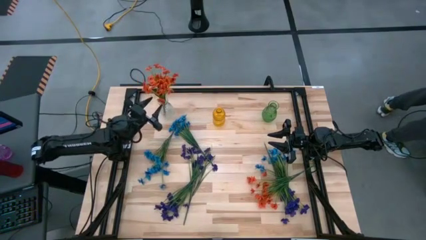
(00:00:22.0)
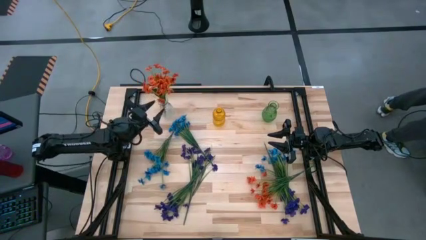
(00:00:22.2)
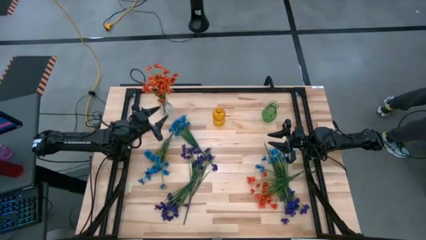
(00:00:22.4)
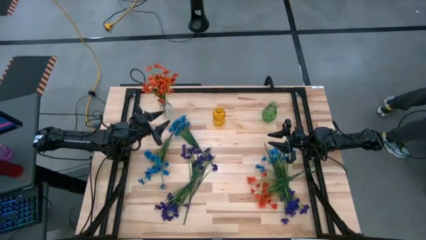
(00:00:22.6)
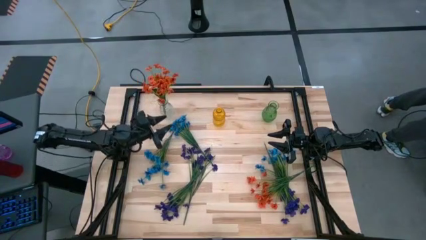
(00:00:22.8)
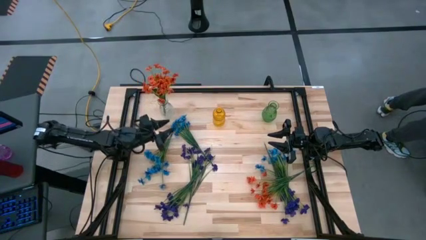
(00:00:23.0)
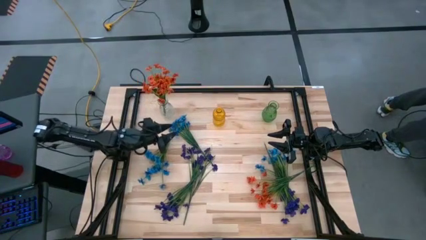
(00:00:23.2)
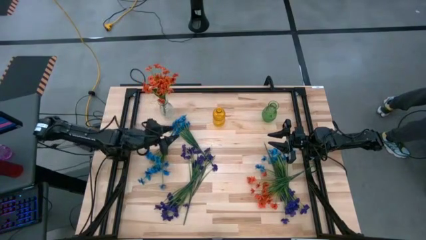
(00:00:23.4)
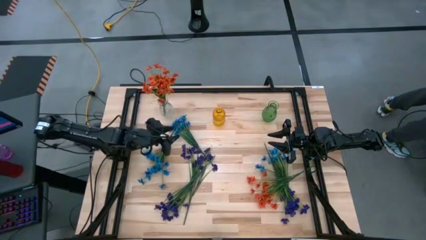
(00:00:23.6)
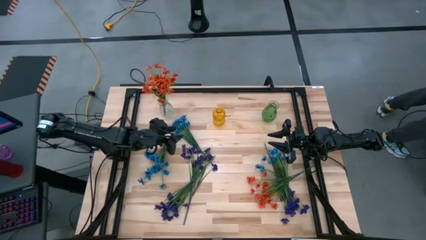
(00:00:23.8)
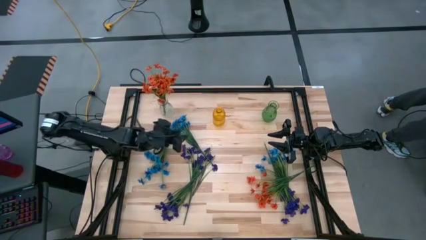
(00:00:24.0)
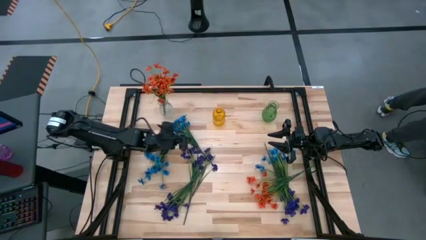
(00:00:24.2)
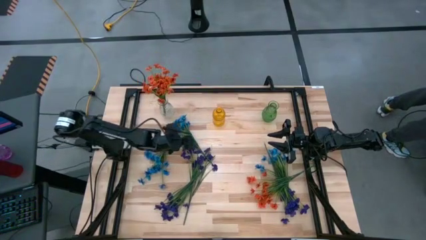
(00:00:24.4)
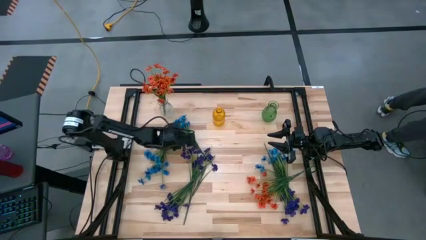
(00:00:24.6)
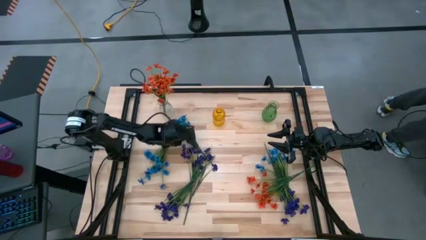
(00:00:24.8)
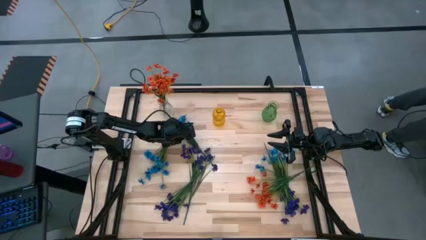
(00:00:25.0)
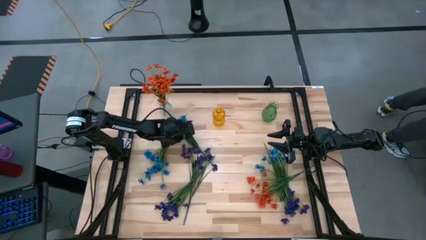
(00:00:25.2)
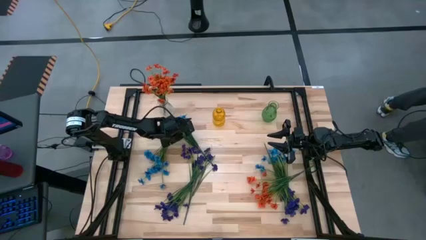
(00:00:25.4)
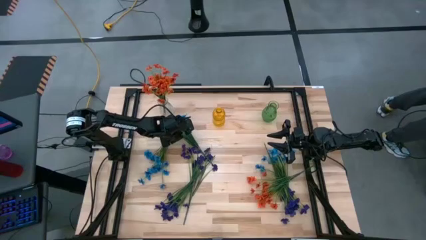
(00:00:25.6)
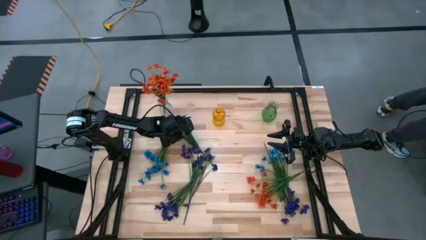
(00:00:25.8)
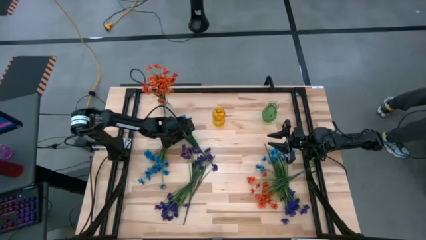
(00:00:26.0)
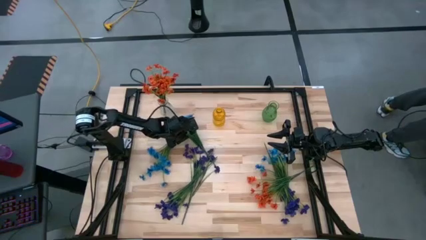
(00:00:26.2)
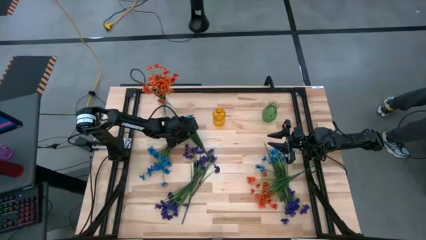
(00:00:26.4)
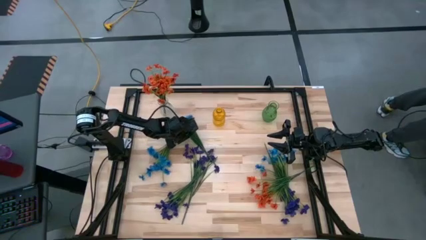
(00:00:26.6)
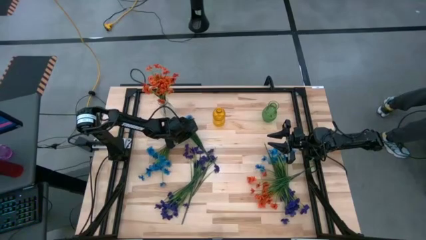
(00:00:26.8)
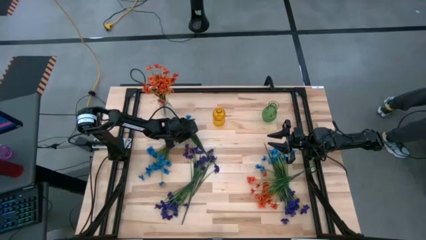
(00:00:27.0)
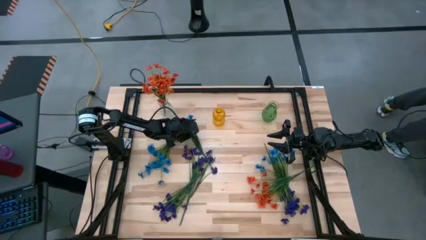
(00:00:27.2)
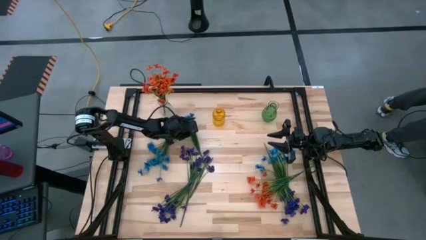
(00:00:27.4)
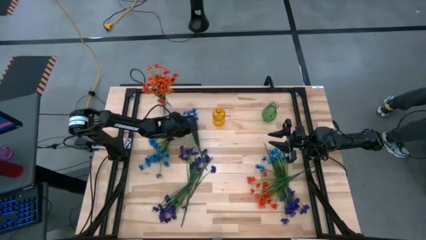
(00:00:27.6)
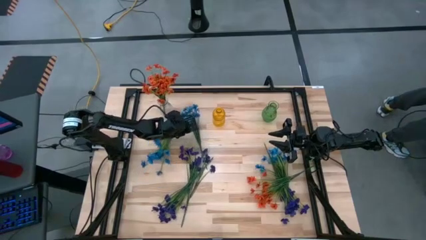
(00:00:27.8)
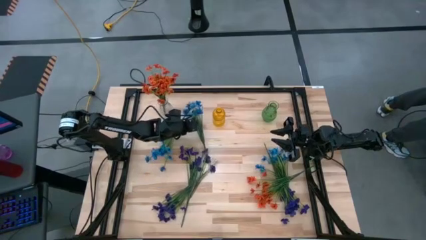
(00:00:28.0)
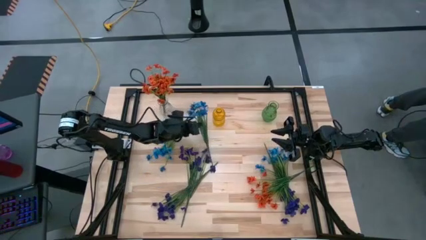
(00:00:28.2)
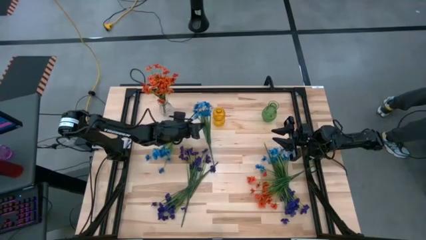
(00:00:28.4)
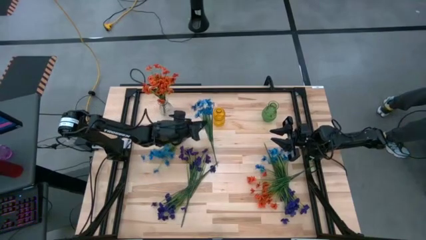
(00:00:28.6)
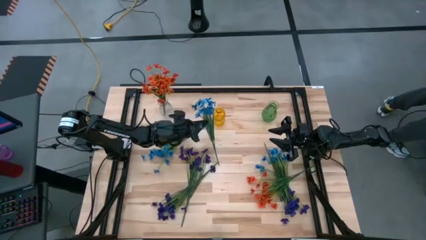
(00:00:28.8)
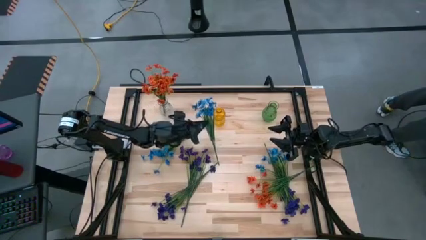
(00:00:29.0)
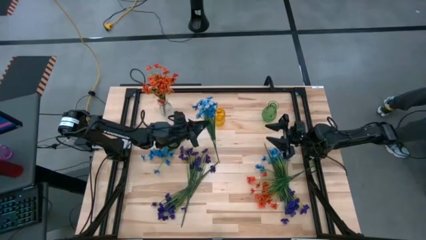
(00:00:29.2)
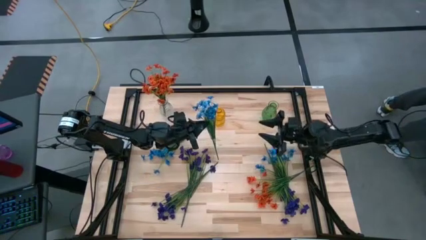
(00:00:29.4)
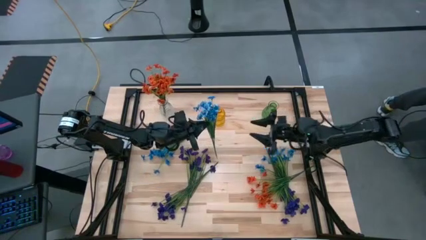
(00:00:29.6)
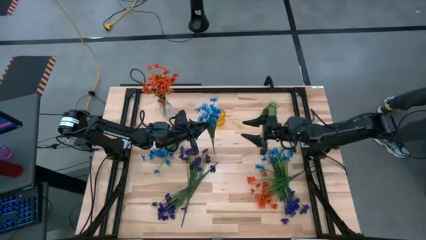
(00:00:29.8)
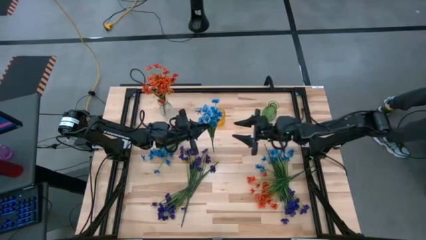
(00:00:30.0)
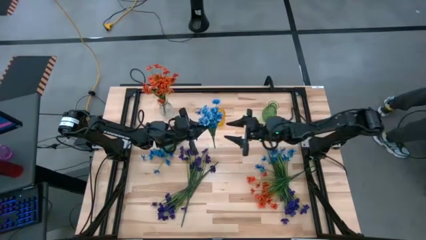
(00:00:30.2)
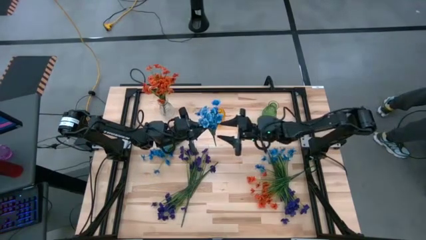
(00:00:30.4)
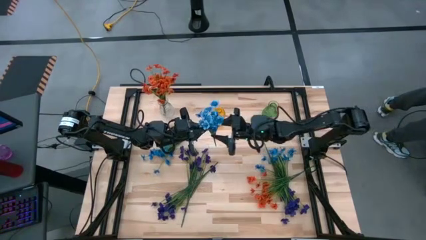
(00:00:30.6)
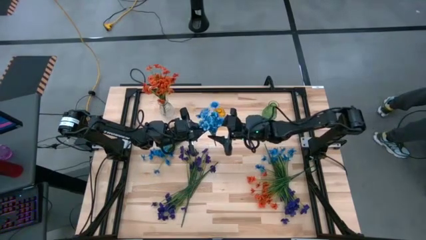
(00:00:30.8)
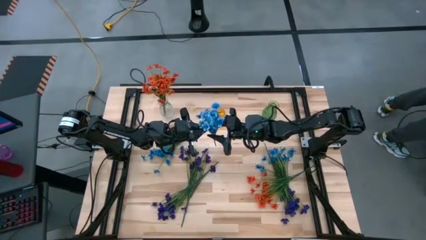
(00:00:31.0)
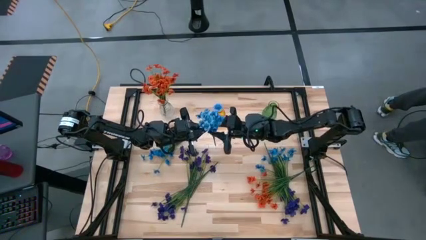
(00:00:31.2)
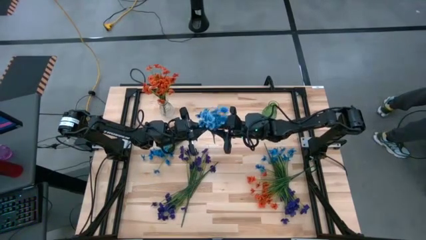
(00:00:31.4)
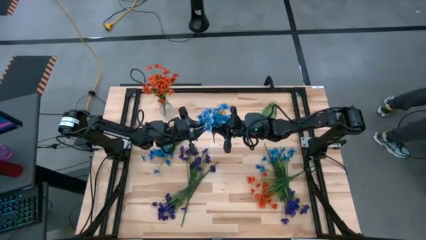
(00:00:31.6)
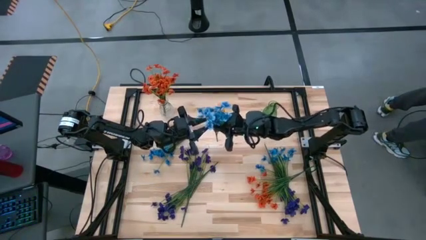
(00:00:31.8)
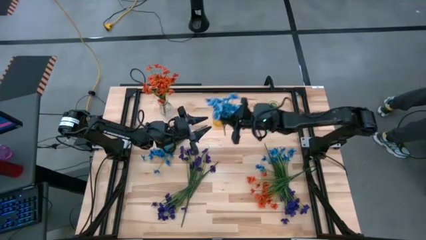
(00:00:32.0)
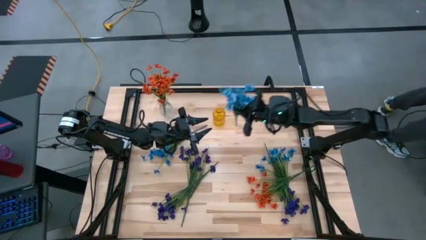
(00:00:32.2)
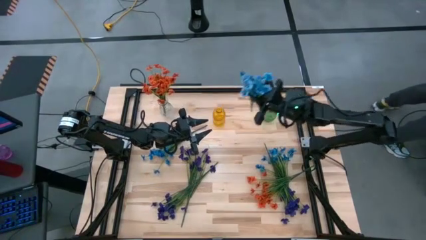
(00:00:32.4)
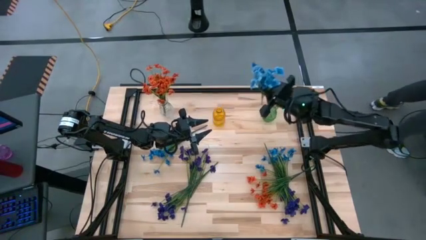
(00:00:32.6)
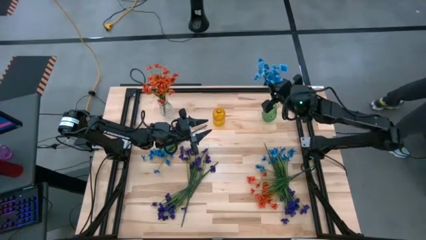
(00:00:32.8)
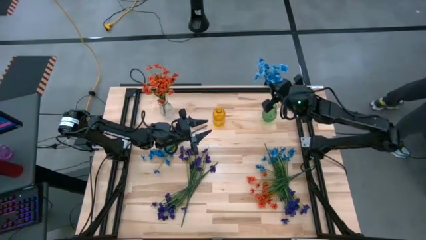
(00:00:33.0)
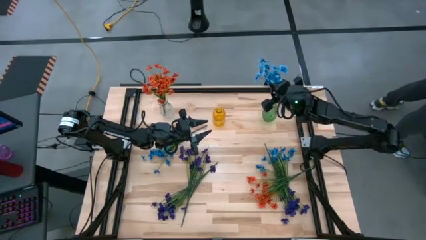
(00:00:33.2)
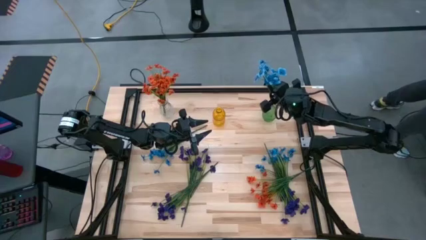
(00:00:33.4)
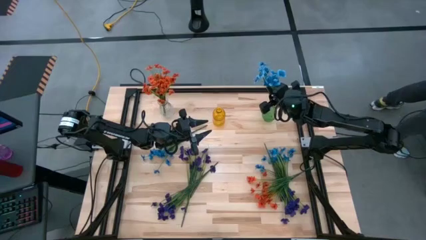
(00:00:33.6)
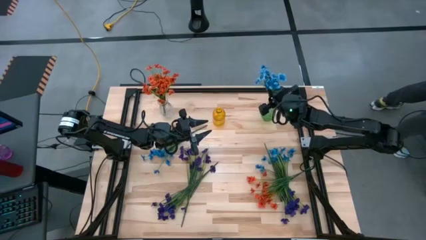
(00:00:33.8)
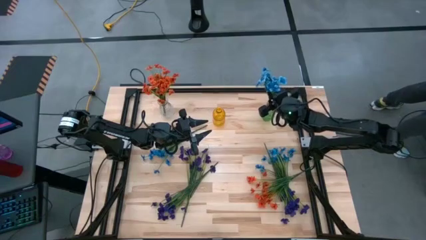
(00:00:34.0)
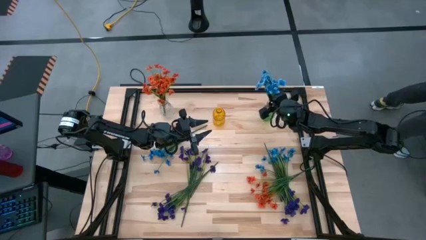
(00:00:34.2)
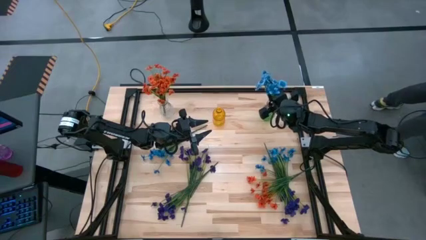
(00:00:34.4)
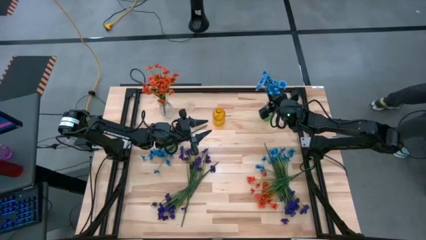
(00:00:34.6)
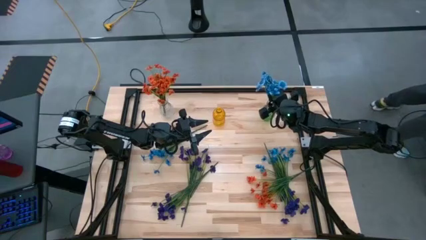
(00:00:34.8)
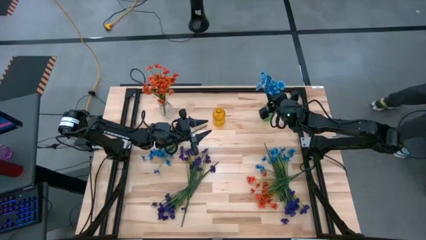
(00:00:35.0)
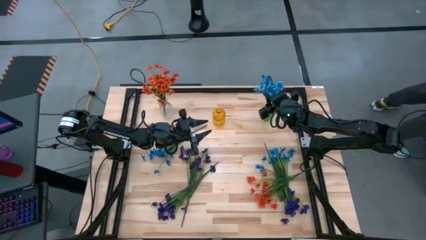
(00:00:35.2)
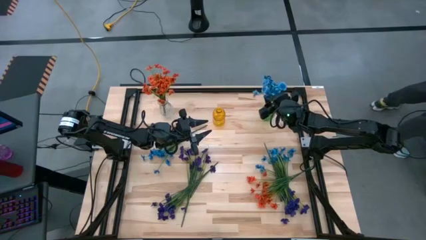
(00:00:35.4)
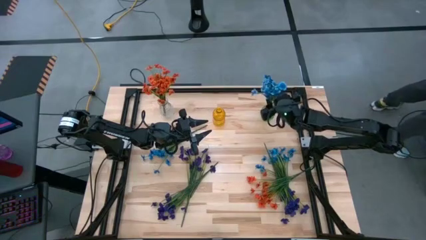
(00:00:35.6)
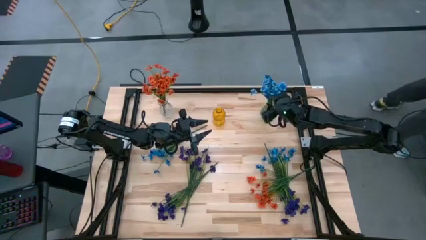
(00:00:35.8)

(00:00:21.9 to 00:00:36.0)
Task: Sort flowers into vase by color
Put the top blue flower into the green vase
